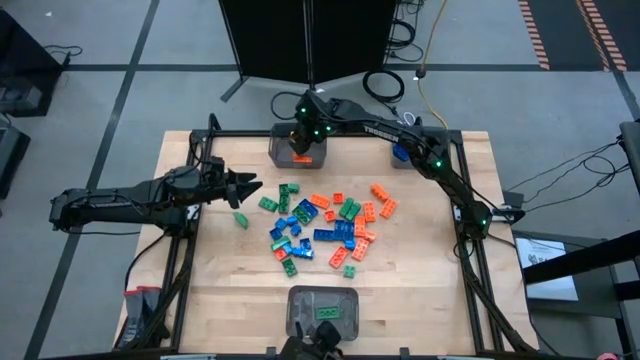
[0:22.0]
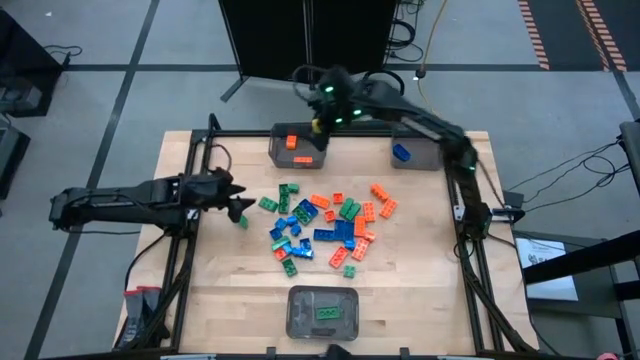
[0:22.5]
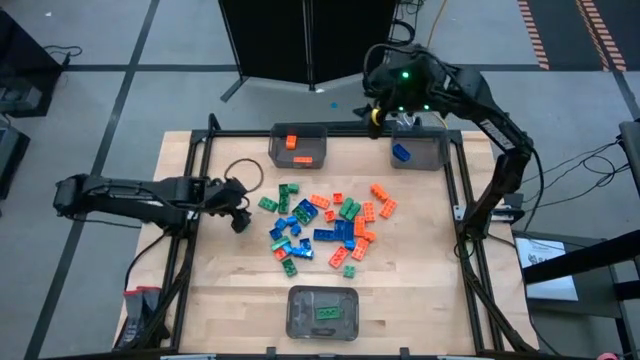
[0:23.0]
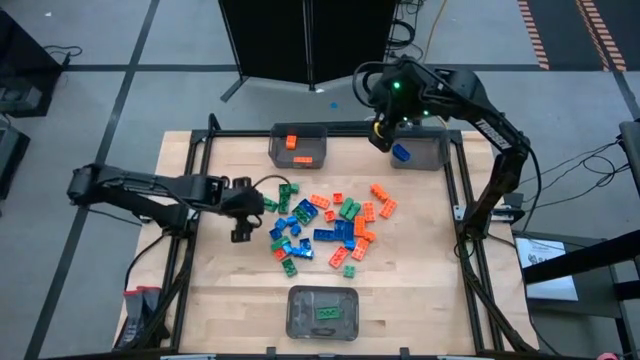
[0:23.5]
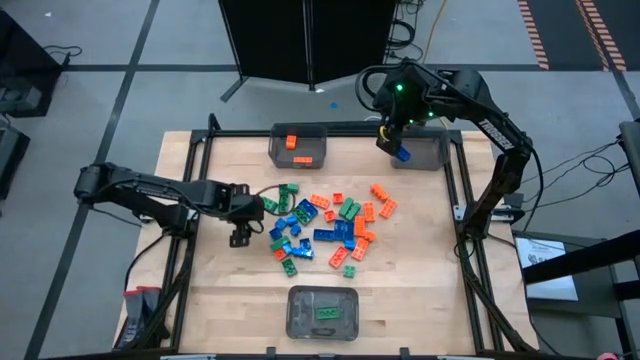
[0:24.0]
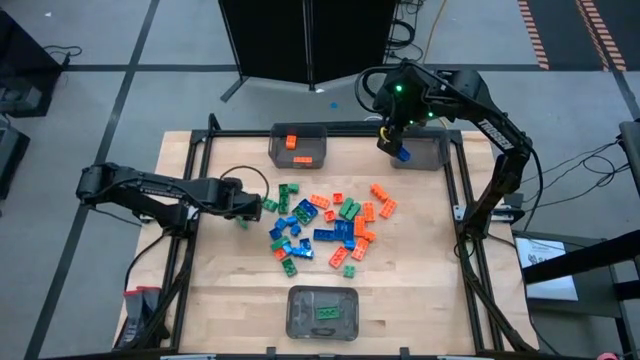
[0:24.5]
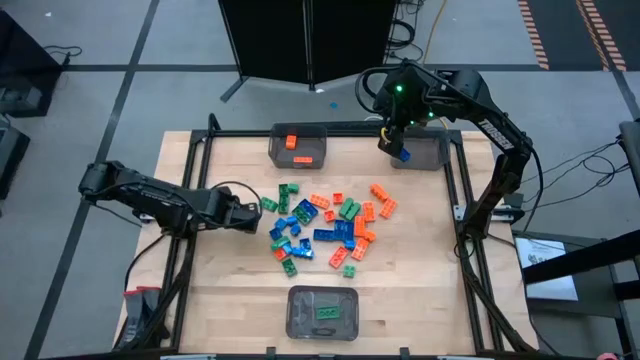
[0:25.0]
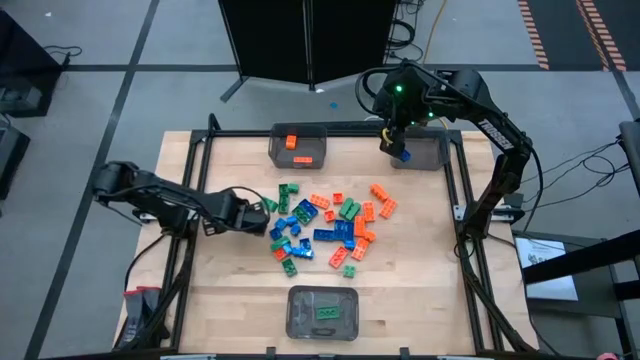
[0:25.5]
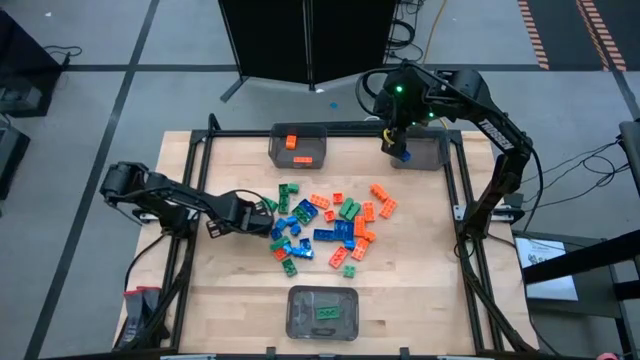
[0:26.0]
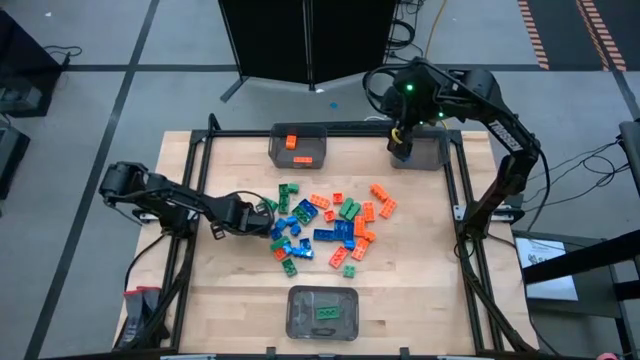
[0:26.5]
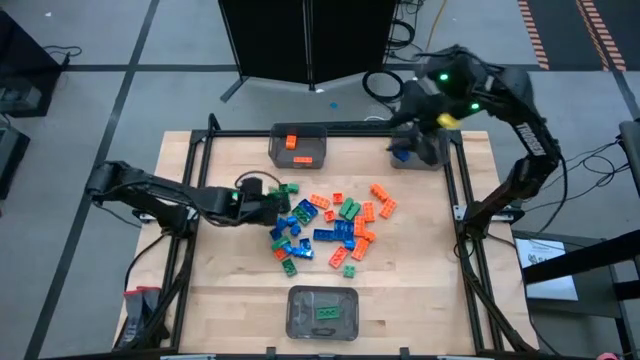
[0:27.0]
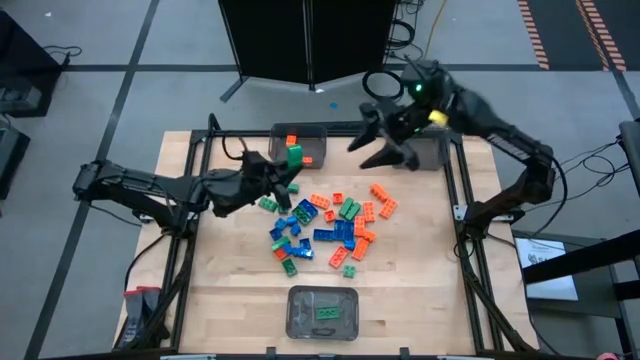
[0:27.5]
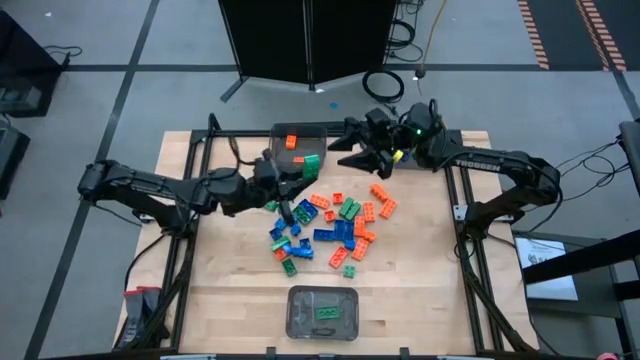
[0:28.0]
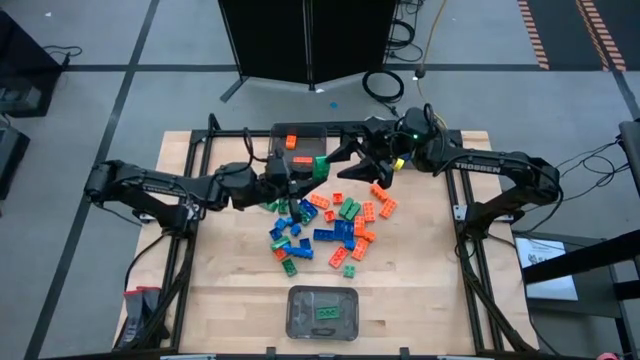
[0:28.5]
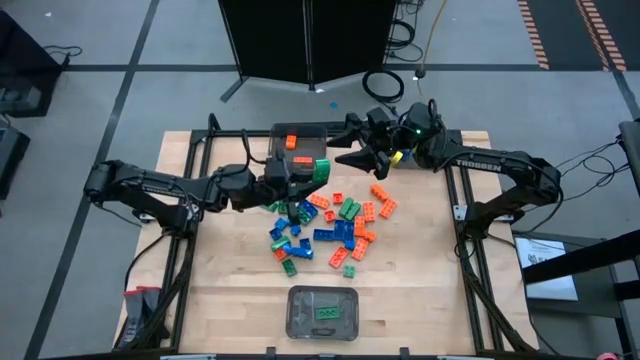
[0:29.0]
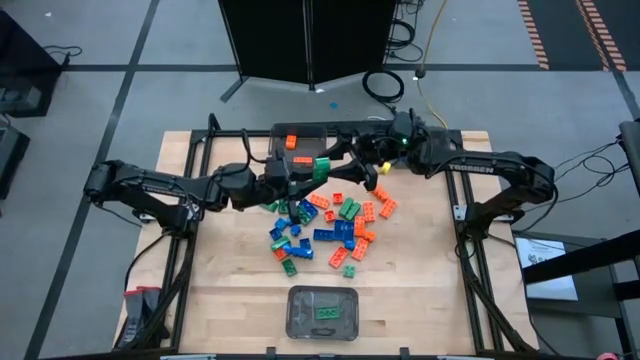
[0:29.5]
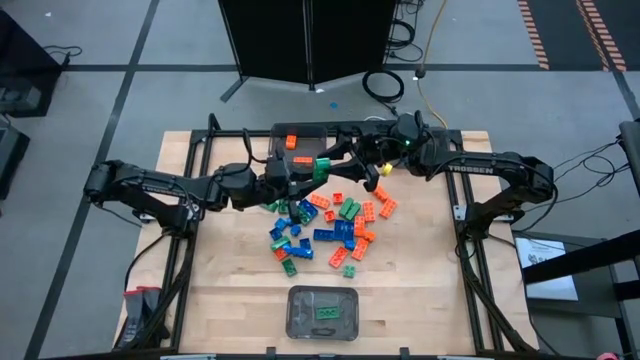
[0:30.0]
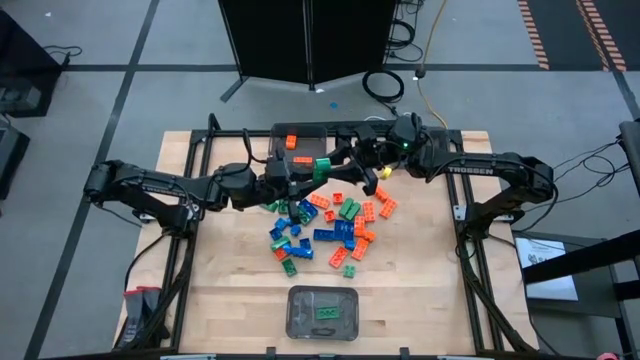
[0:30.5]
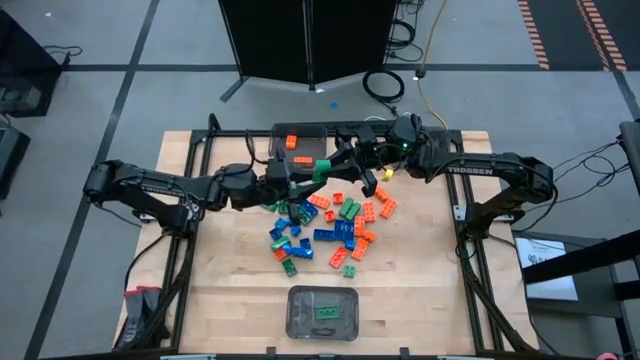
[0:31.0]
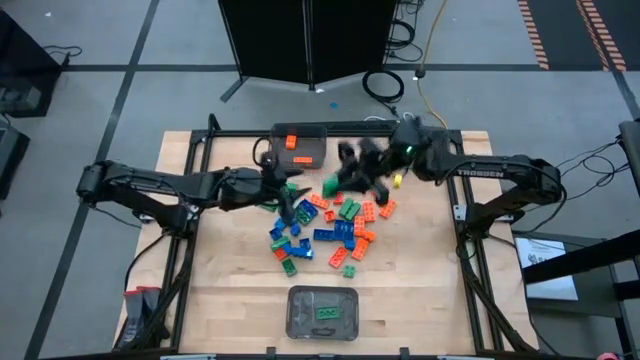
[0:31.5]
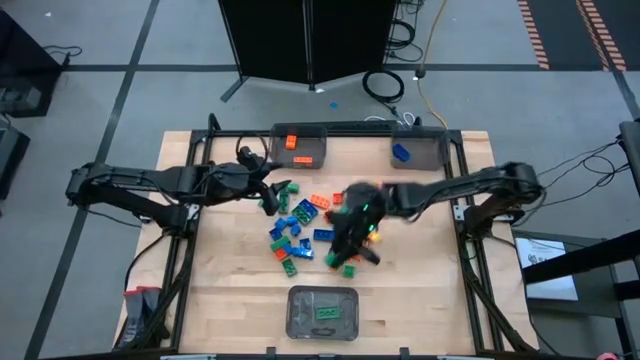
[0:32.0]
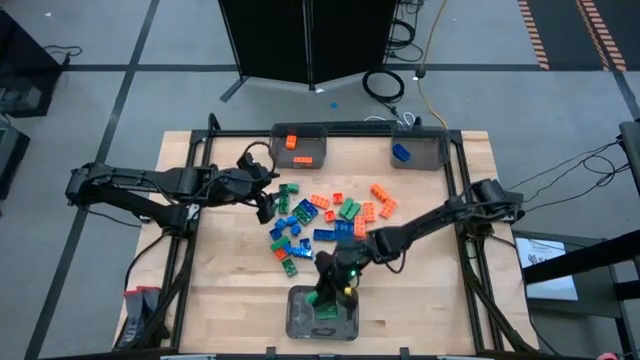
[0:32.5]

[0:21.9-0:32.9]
Task: Sort blocks
Put the green game piece into the bottom black bin

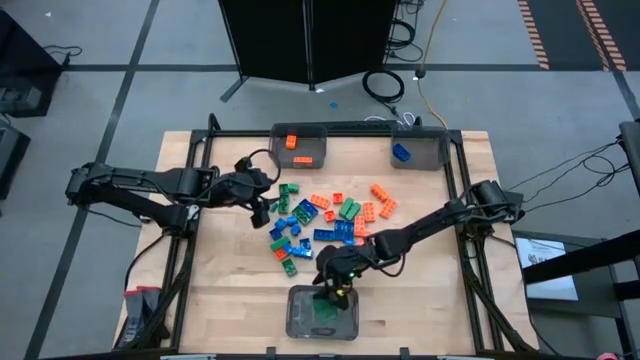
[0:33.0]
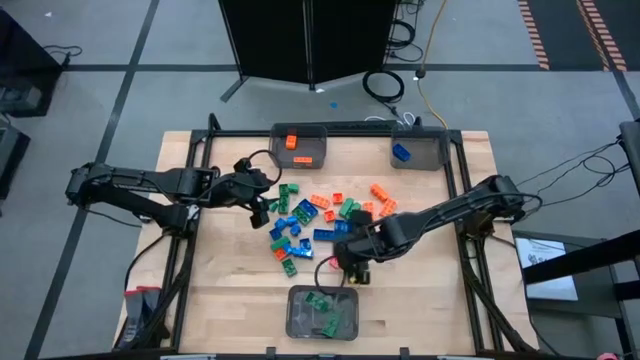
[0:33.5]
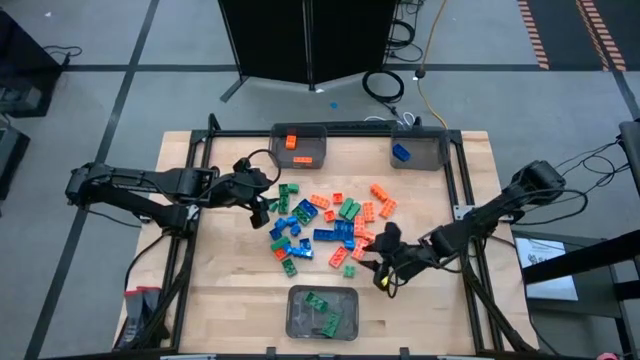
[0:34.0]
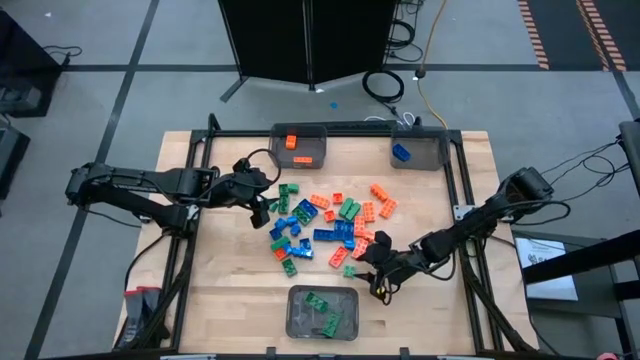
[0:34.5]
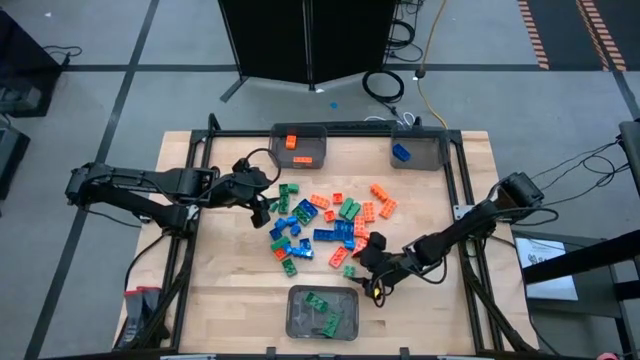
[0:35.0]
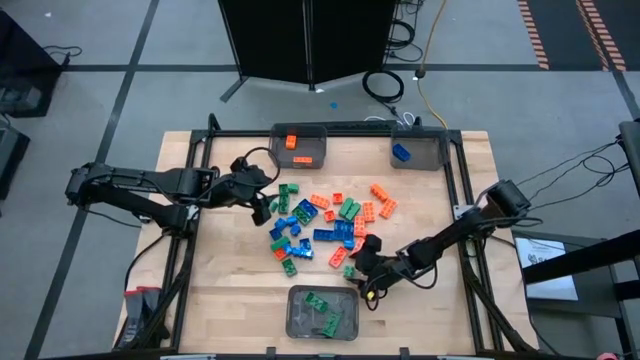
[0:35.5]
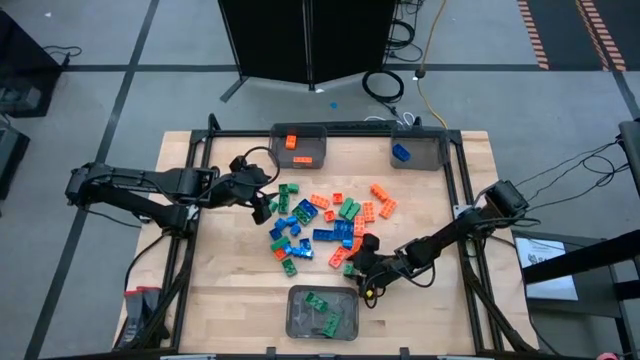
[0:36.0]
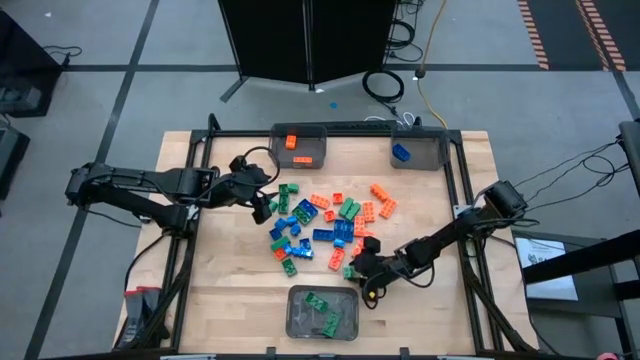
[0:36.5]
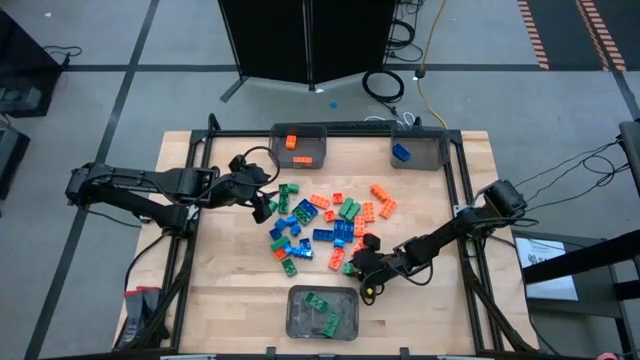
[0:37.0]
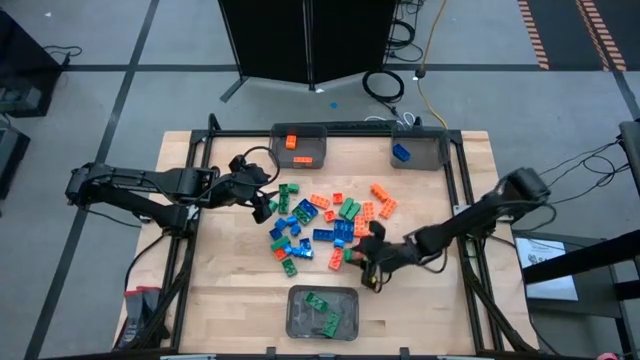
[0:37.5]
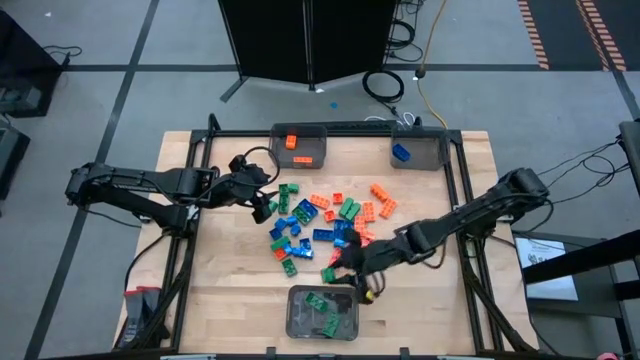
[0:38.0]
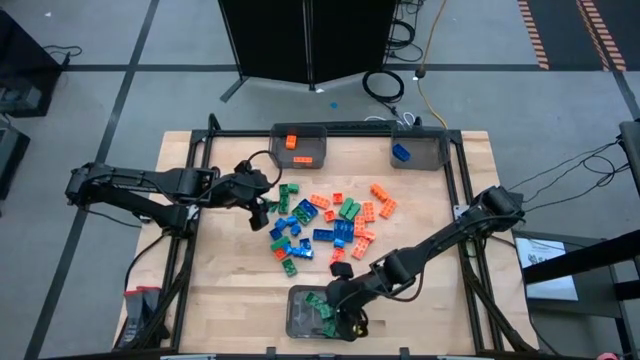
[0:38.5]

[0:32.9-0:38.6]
Put the green game piece into the bottom black bin

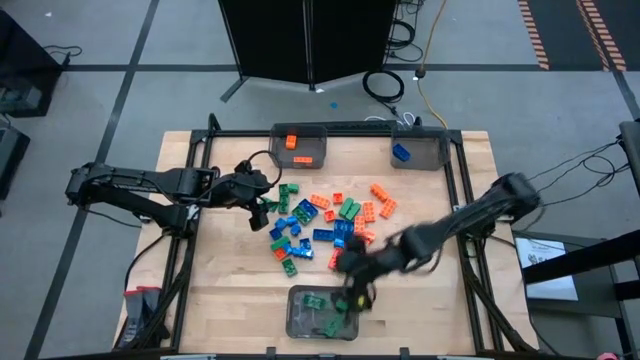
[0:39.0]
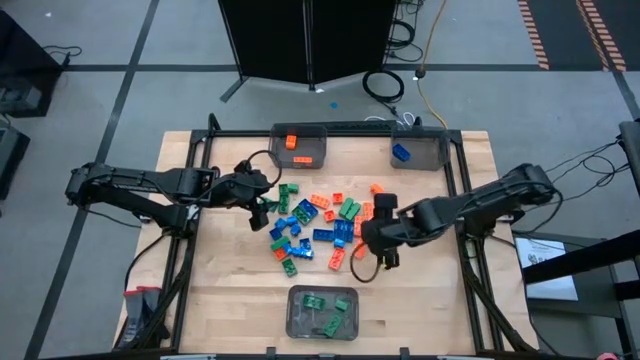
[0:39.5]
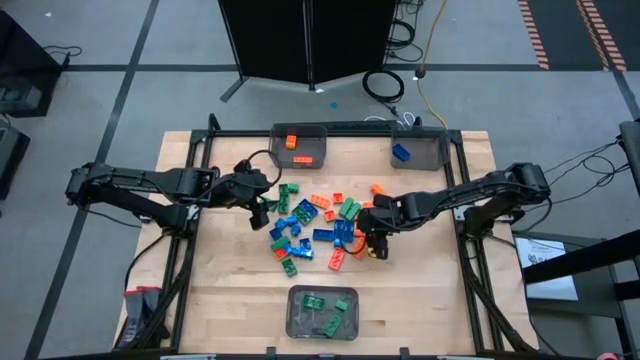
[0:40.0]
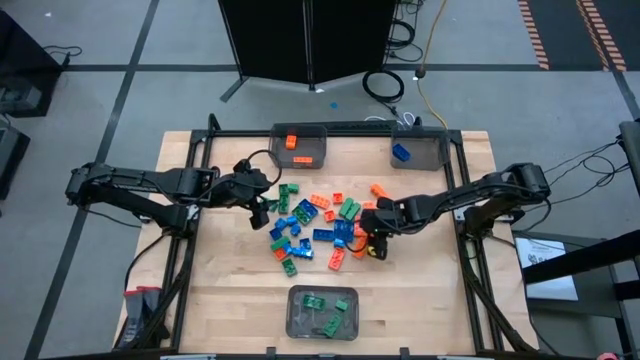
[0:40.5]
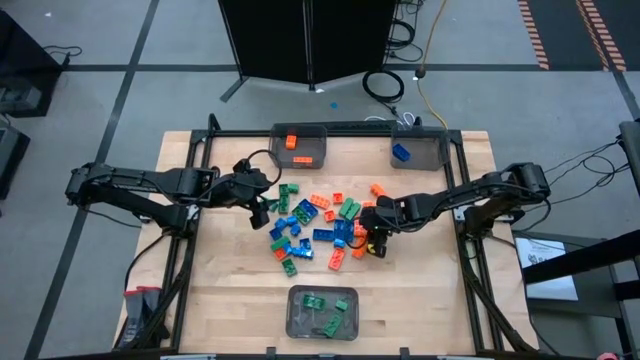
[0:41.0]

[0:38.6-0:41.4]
Put the orange game piece into the top left black bin

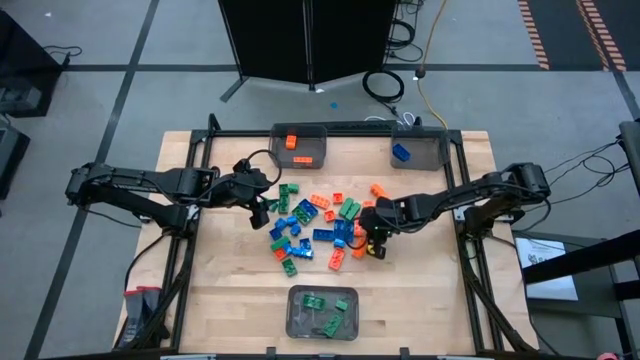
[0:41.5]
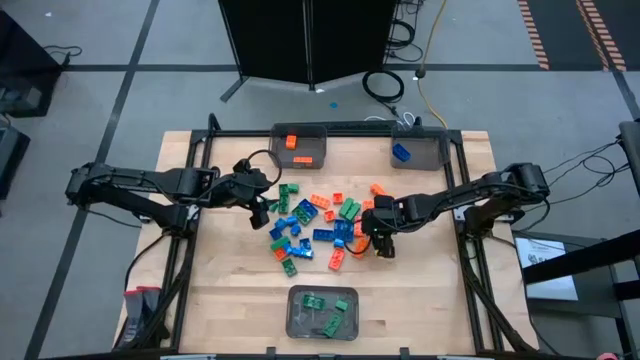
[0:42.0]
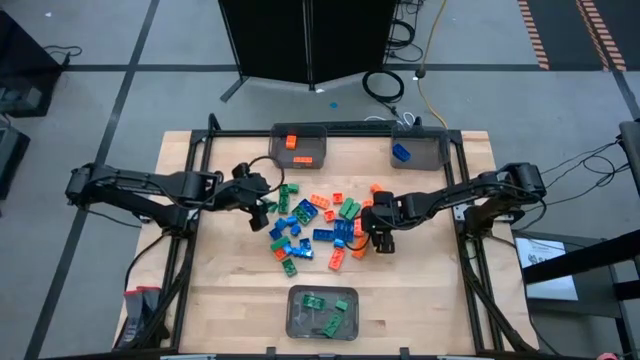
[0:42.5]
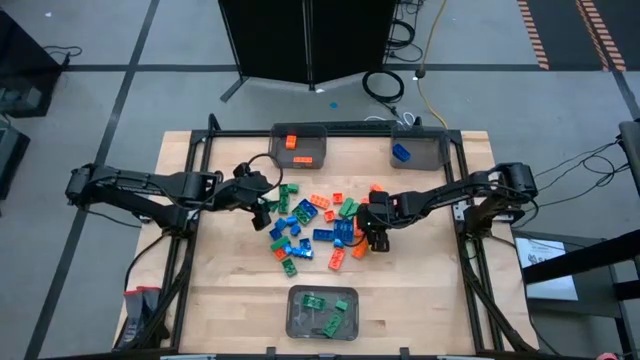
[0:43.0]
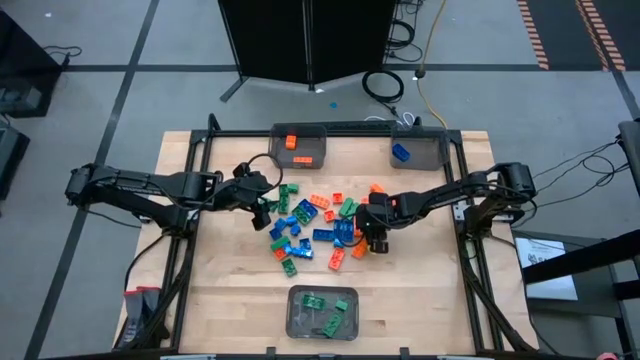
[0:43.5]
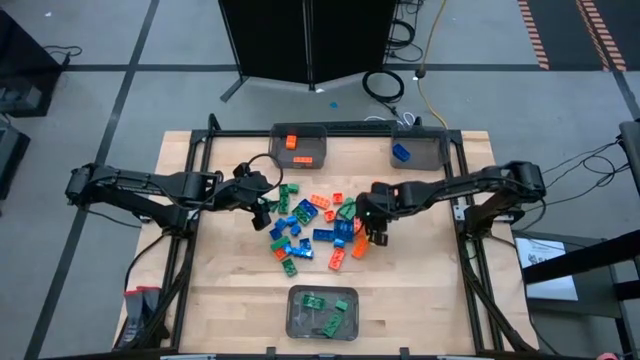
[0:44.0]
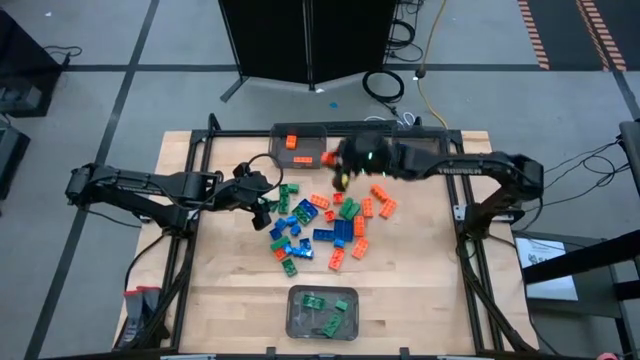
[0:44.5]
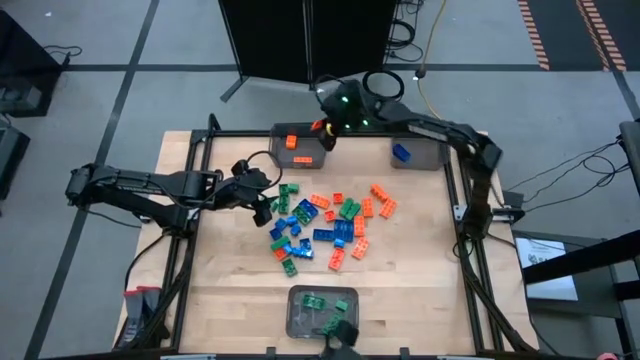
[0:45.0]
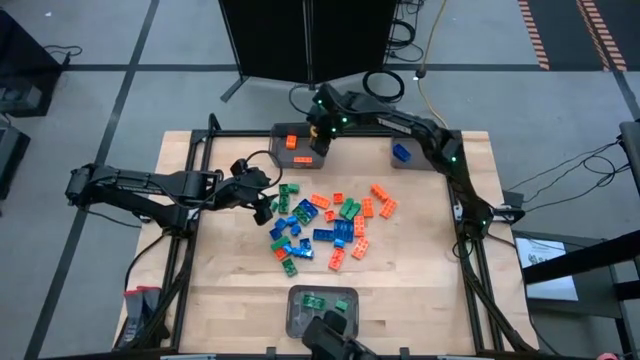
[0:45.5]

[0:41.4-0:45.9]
Put the orange game piece into the top left black bin
